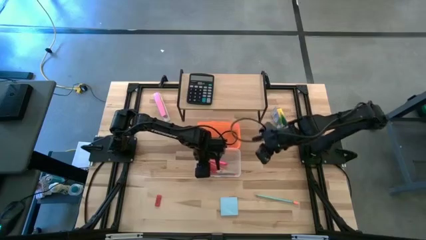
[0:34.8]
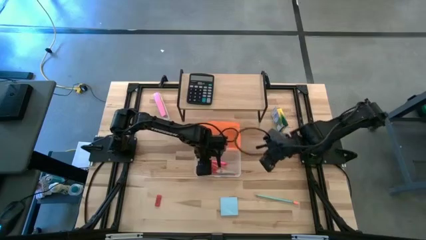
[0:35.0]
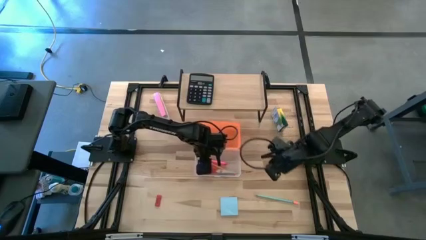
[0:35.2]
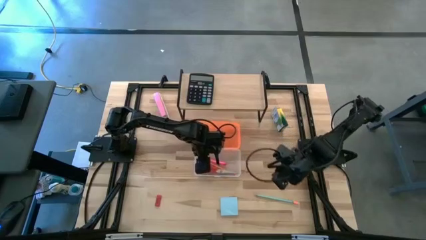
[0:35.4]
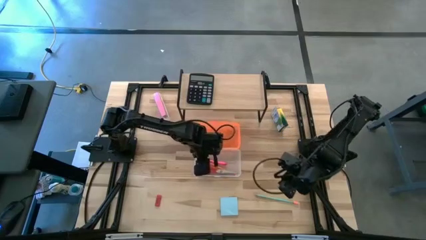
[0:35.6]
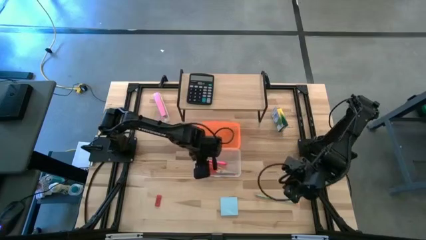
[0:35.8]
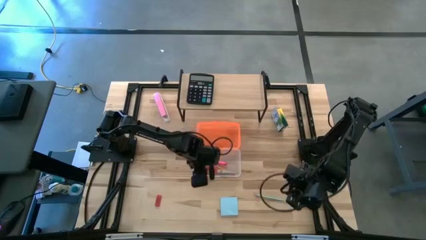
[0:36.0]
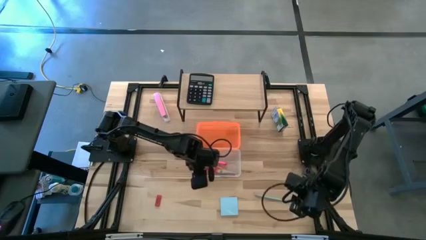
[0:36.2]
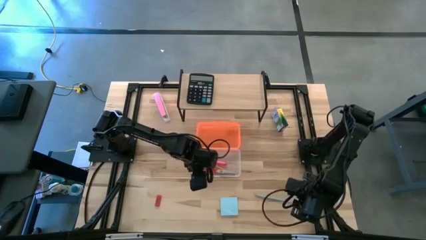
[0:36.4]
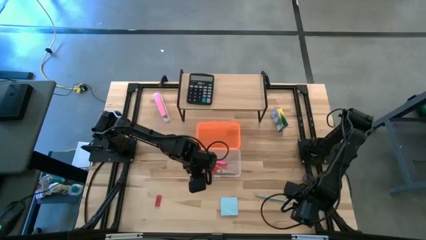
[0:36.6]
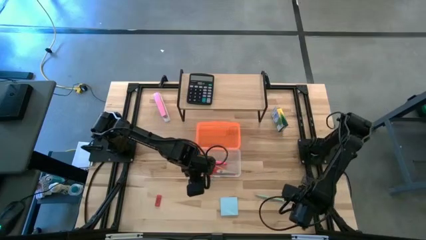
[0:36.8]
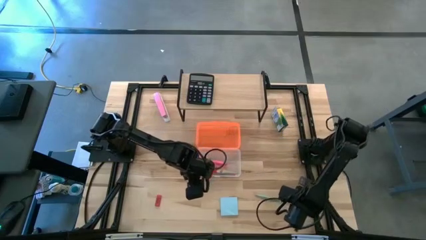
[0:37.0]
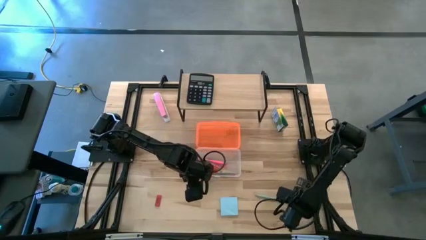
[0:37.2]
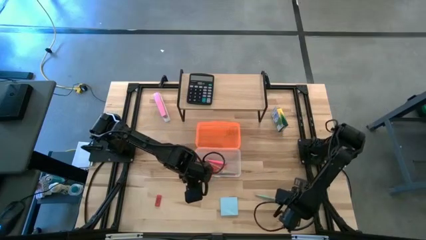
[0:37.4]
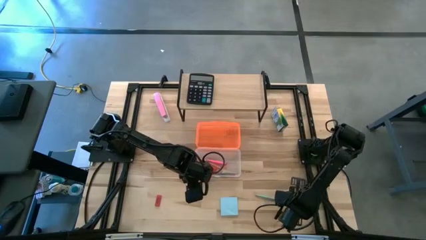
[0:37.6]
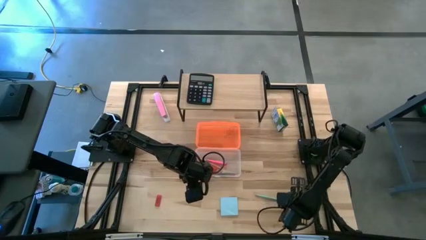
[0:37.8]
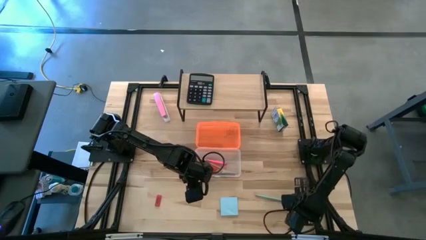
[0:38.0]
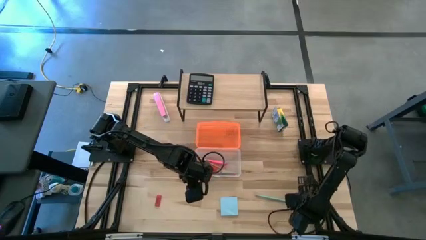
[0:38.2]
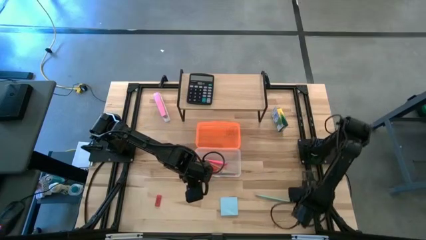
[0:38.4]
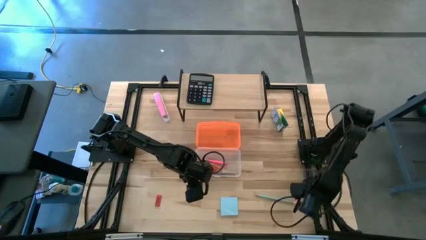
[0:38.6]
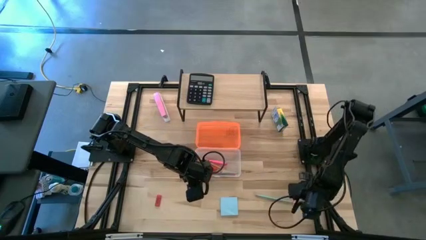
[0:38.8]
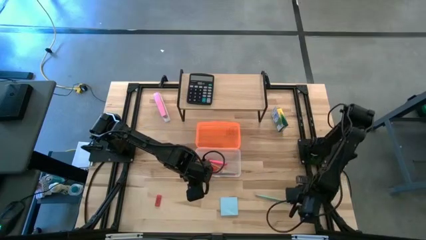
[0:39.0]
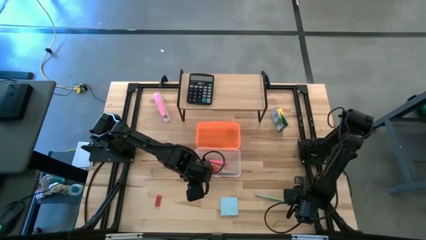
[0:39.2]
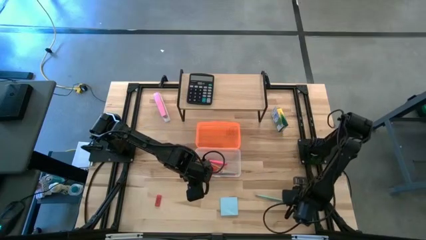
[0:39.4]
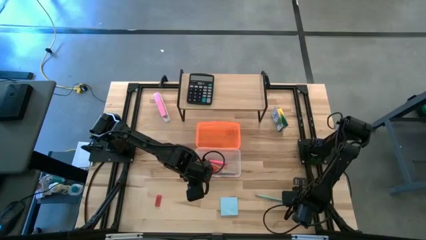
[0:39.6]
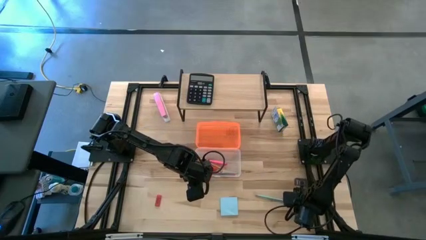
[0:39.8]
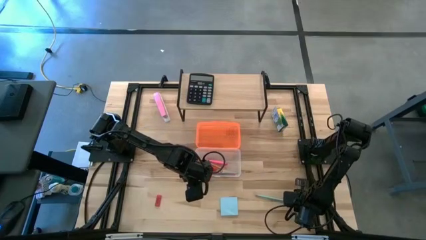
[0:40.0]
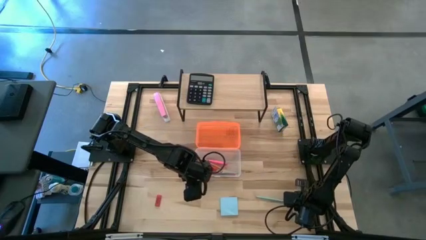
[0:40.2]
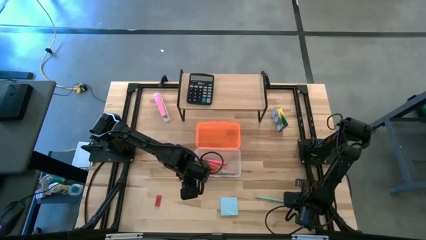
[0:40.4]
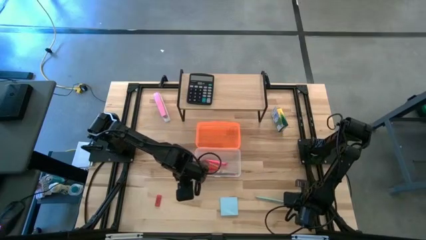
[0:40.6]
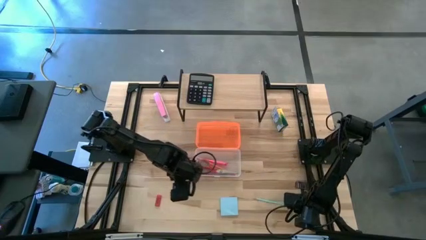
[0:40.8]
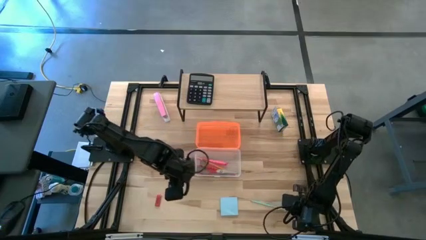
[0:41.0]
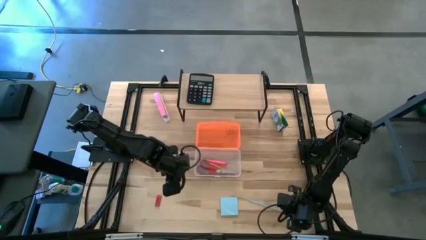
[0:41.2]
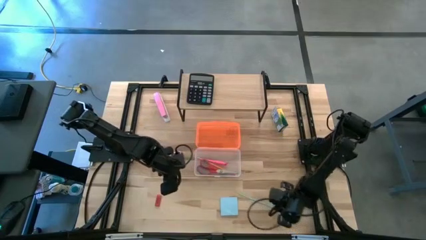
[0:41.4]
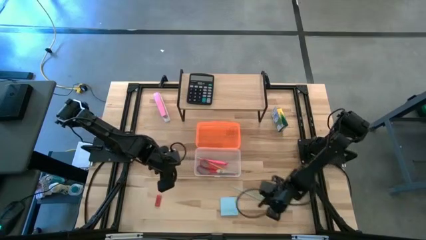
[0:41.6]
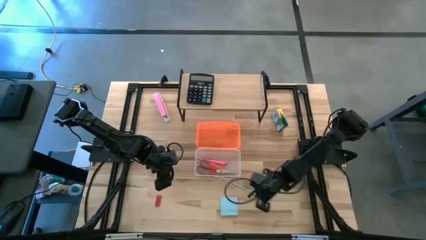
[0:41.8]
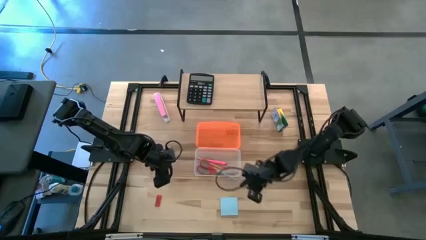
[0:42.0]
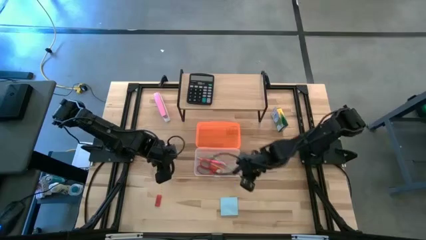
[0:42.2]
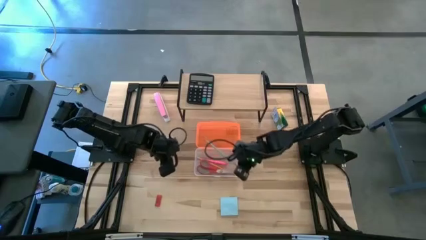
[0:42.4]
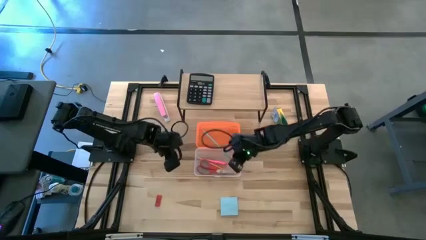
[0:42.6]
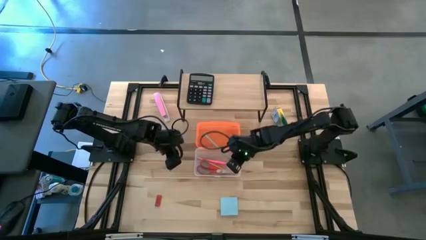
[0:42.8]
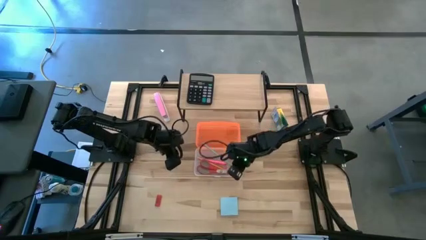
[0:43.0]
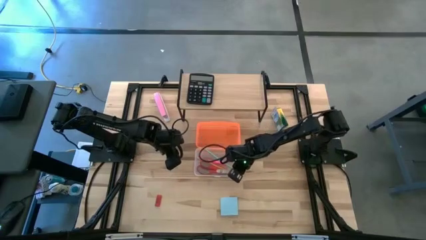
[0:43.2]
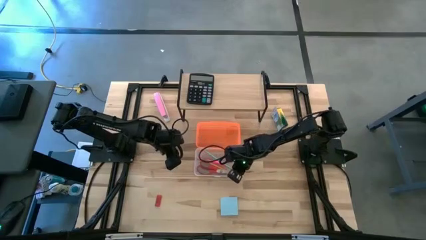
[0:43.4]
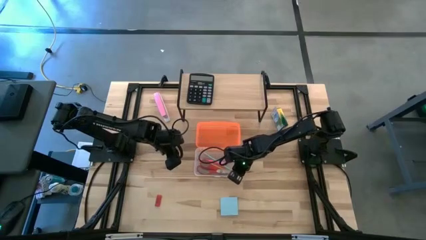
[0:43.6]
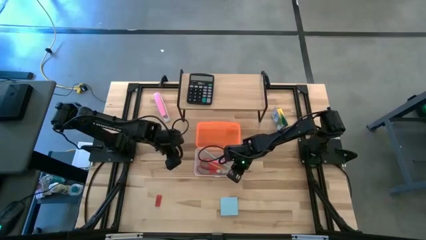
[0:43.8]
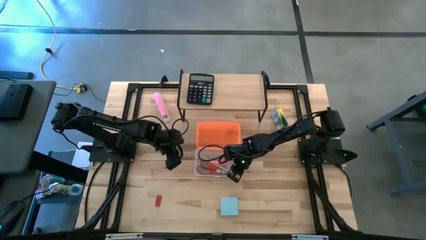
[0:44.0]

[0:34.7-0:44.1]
Task: Pack school essentials
Put the blue pencil into the supply box

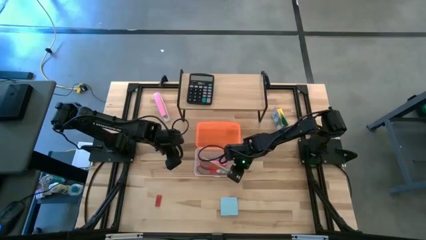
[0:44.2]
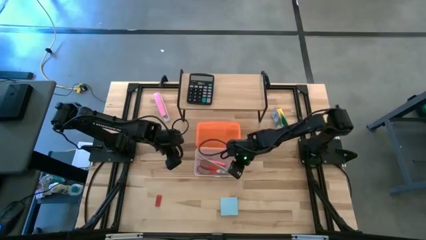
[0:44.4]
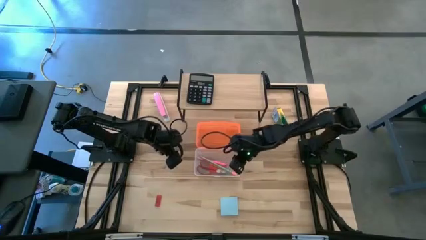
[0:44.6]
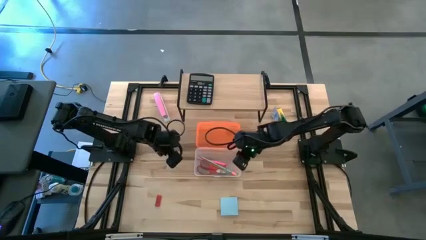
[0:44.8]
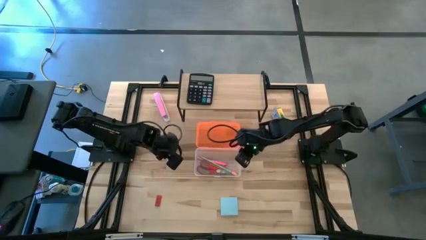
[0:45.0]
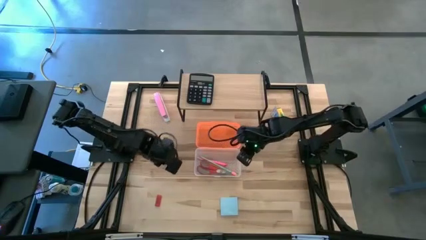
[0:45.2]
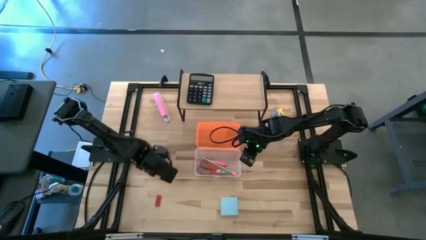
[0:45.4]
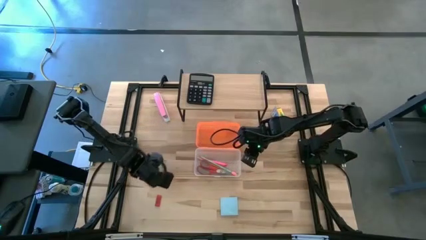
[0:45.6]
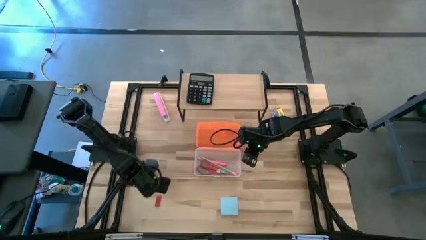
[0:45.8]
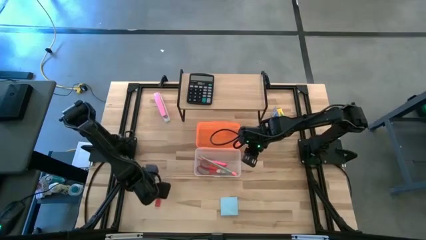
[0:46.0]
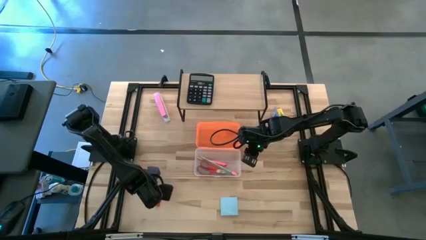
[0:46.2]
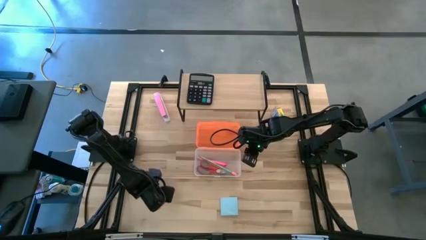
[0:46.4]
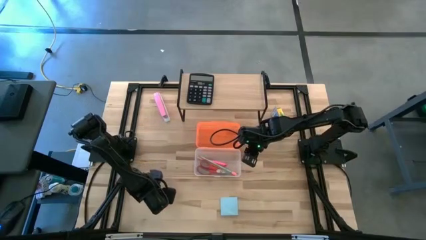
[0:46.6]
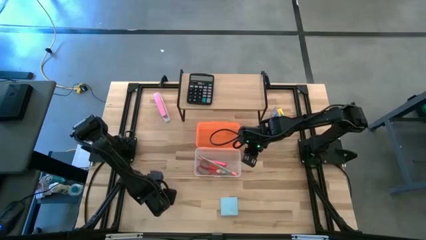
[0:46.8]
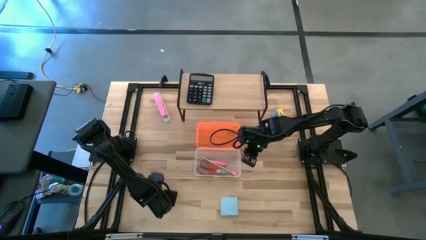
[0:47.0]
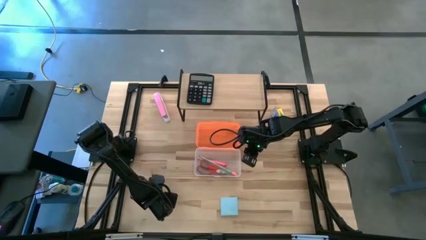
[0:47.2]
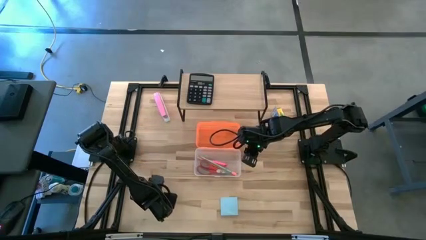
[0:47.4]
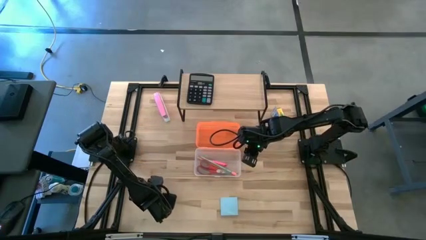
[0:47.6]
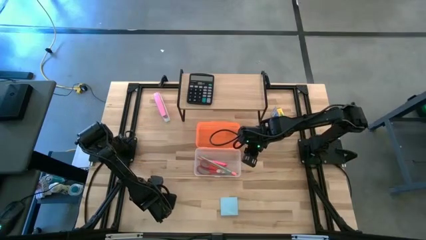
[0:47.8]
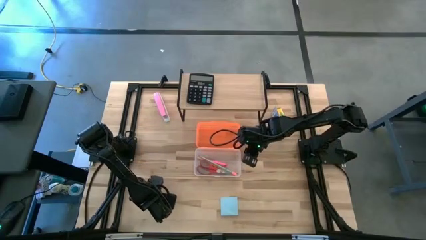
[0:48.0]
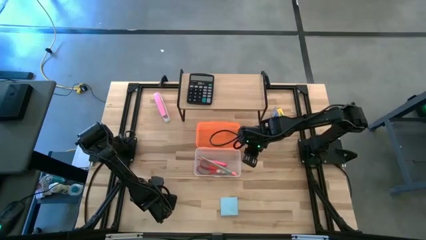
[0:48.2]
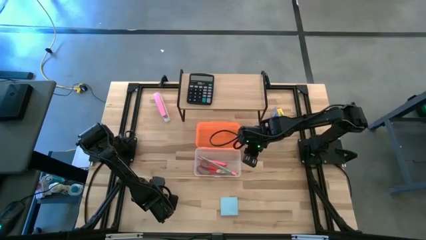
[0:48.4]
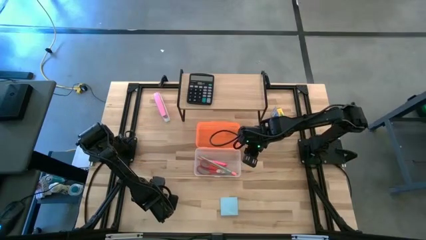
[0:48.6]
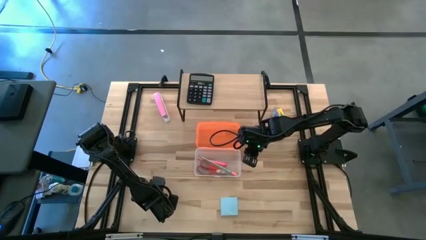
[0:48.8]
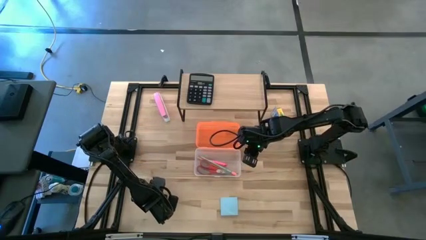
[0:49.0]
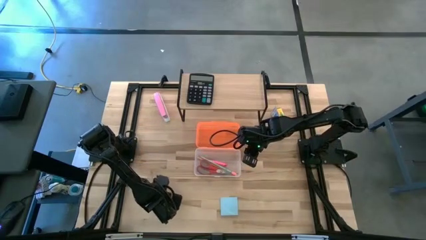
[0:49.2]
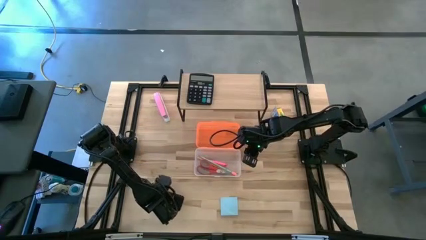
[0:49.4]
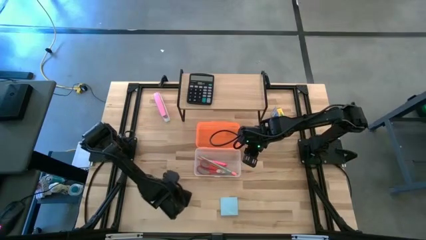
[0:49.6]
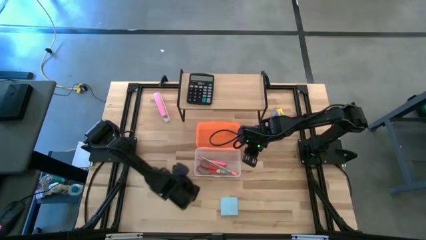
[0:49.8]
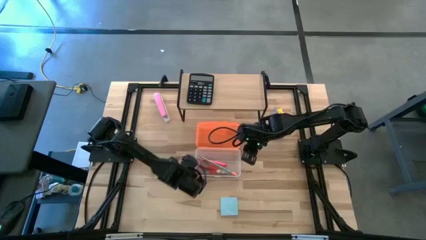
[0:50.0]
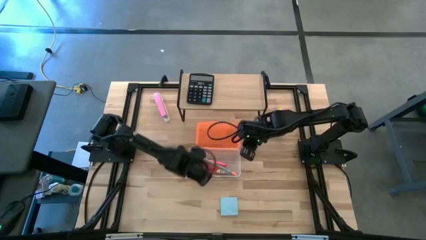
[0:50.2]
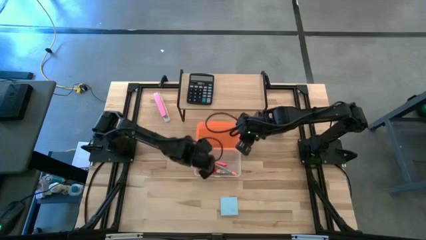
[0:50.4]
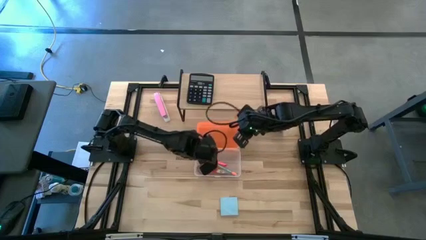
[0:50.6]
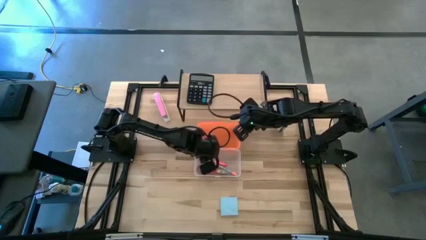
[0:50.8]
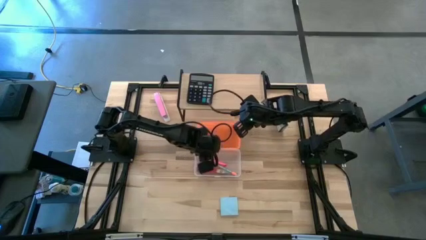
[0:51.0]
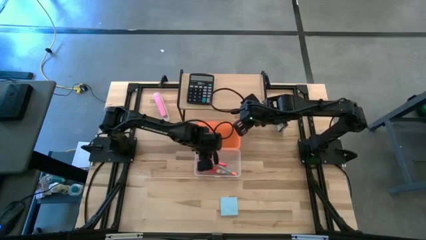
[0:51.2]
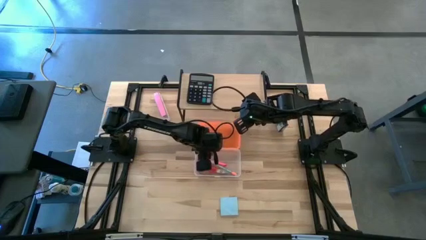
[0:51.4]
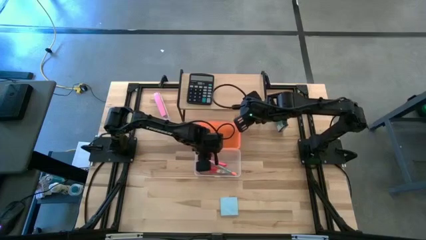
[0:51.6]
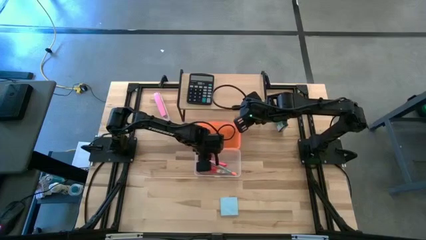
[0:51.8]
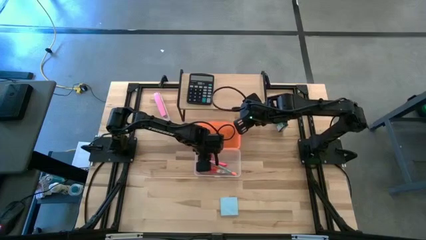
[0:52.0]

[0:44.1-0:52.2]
Put the orange eraser into the supply box
